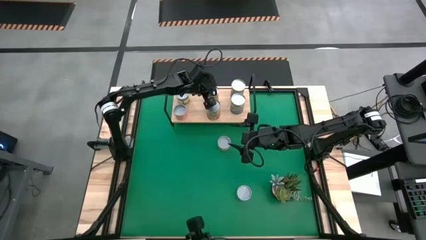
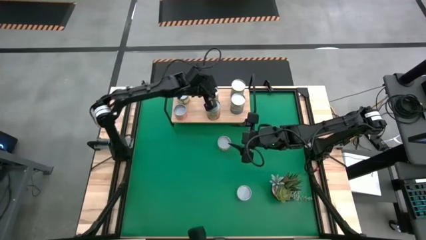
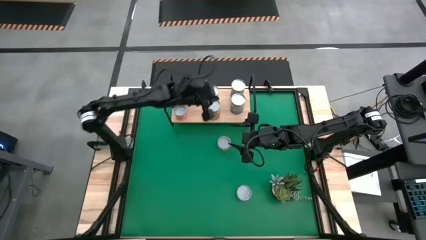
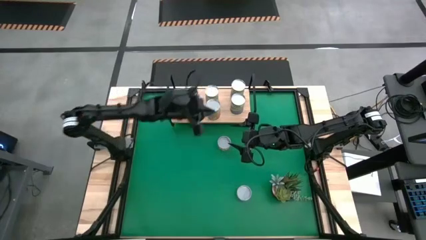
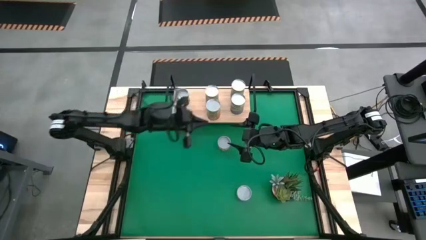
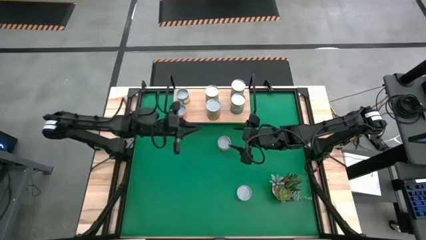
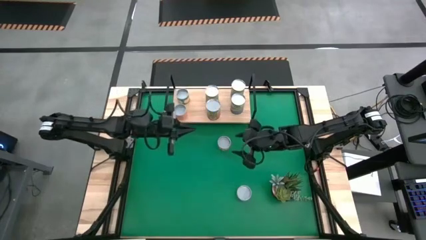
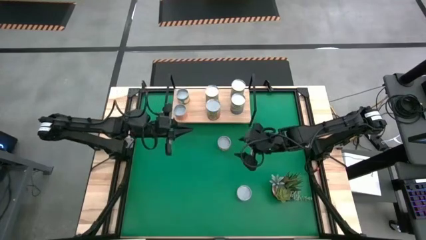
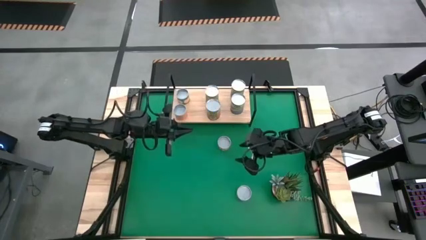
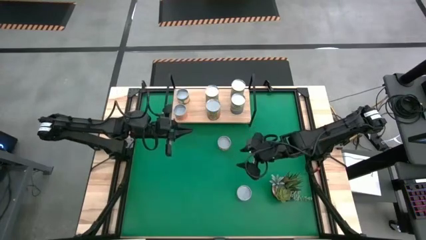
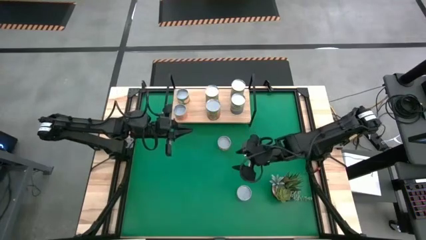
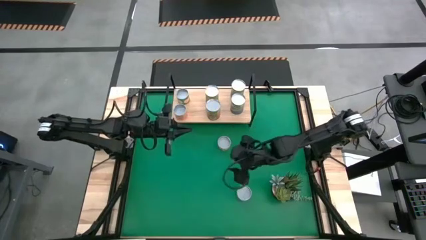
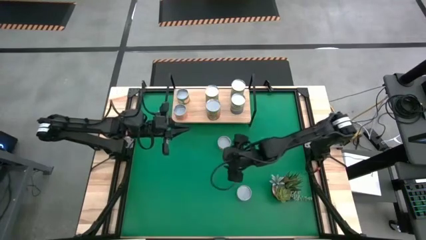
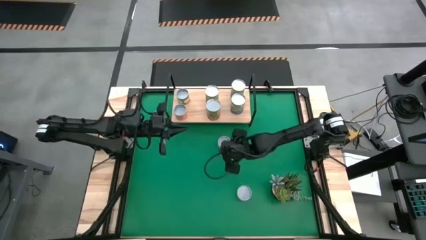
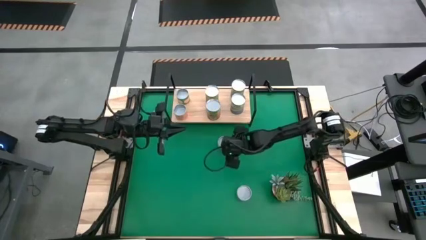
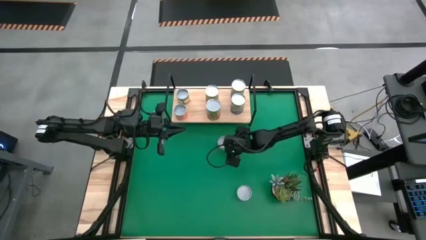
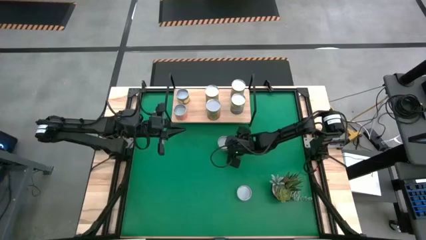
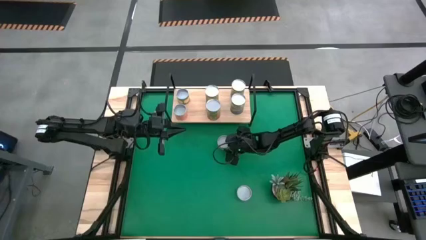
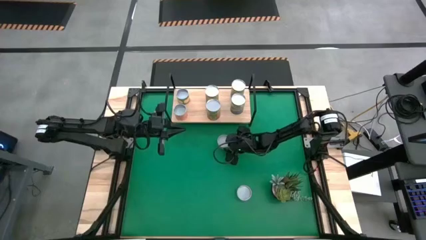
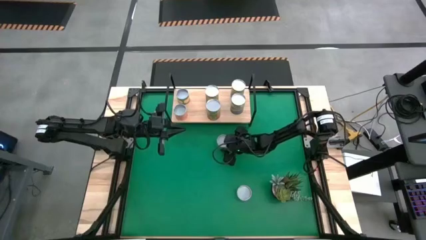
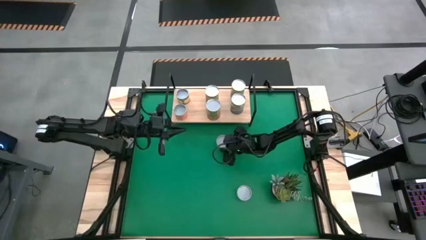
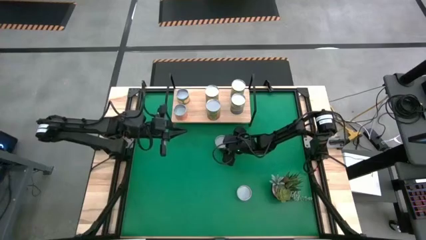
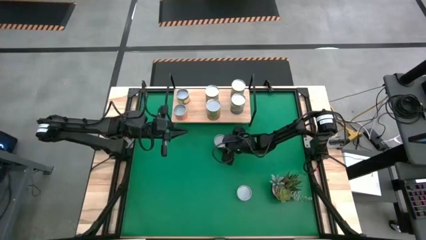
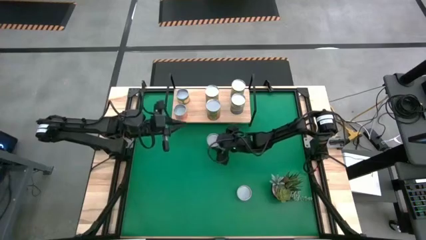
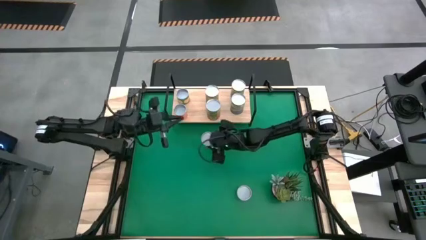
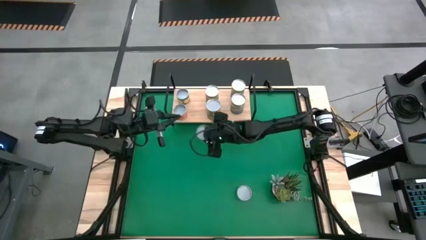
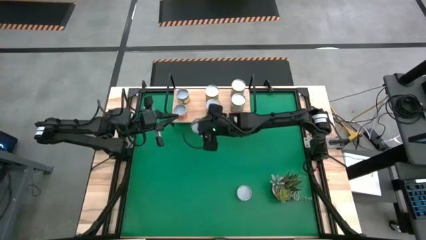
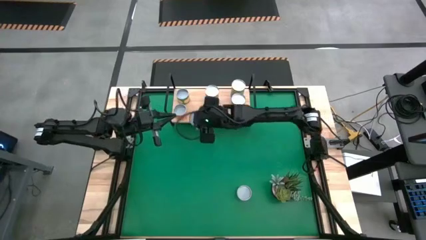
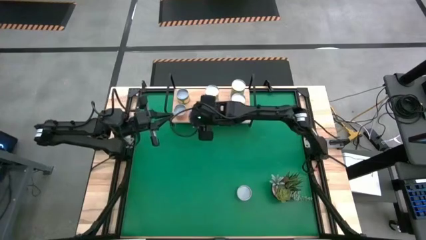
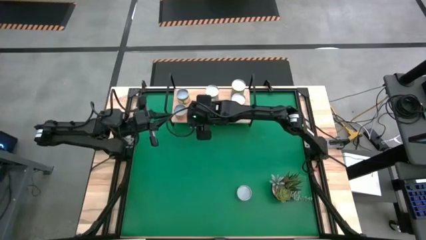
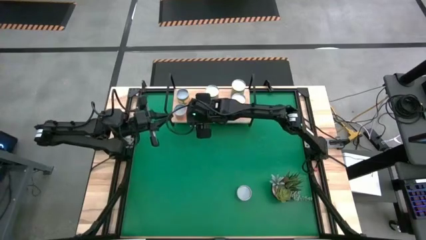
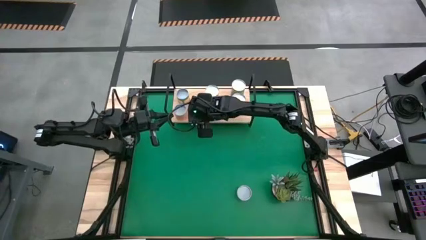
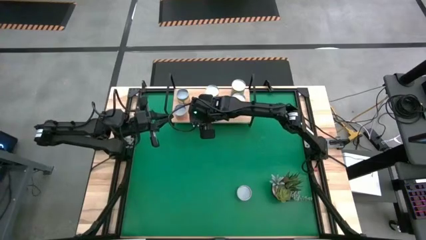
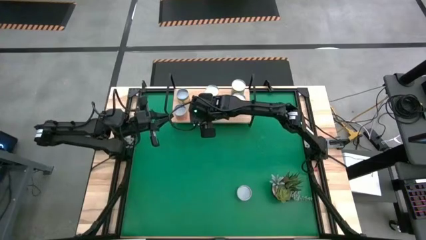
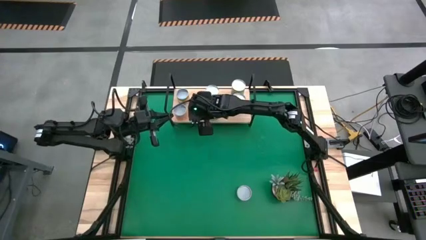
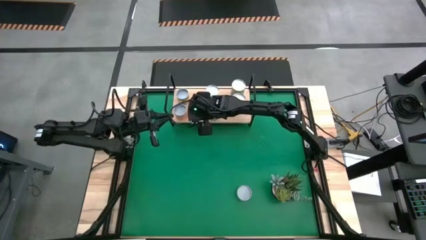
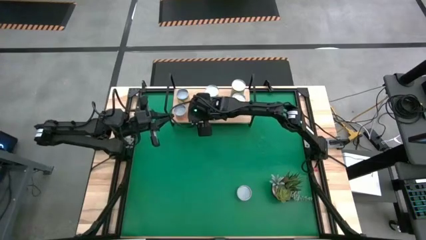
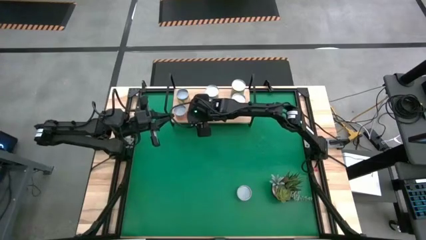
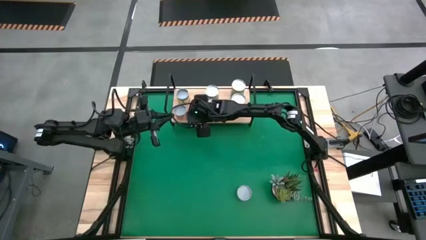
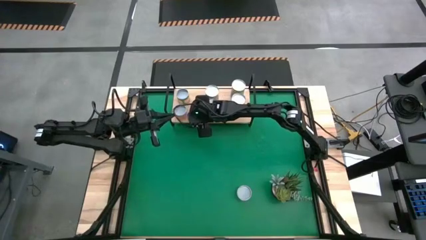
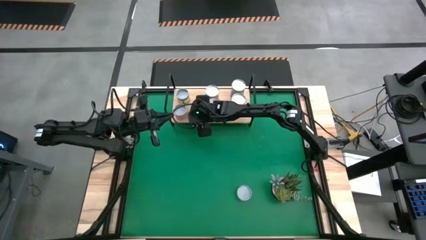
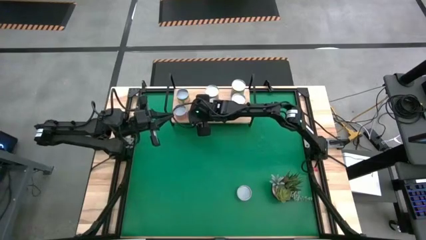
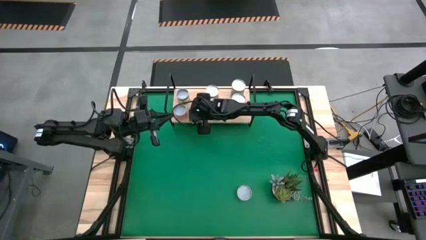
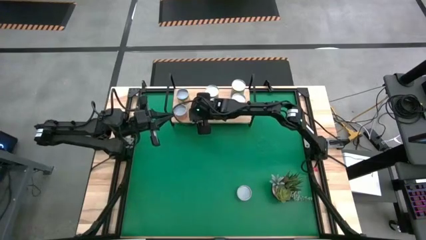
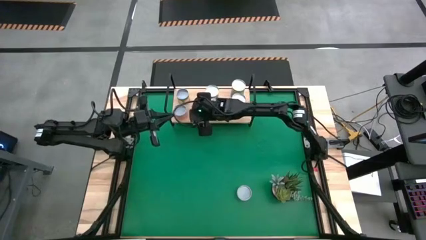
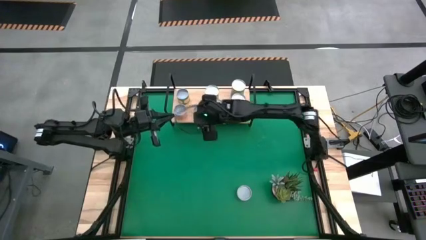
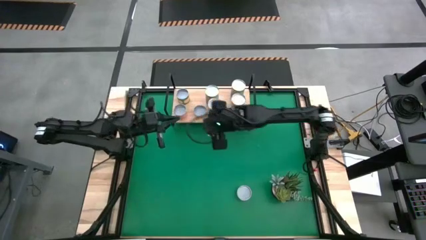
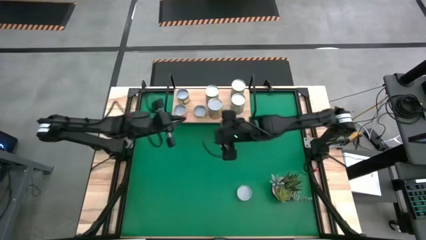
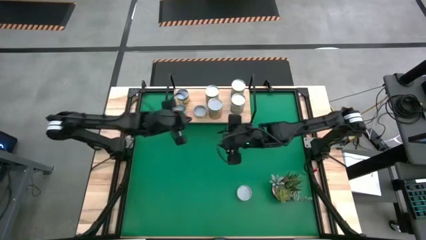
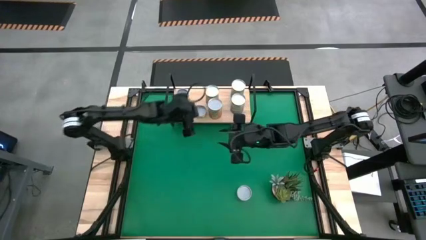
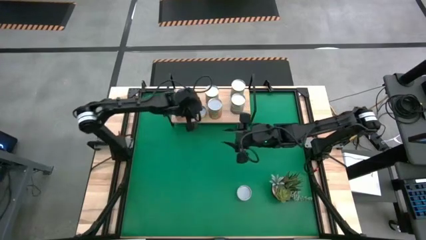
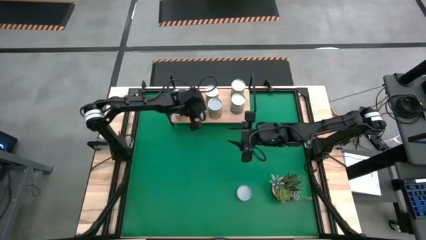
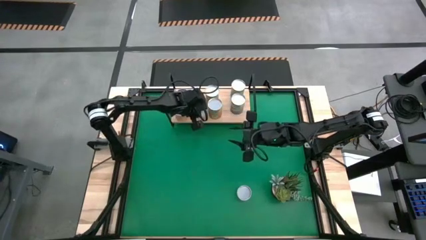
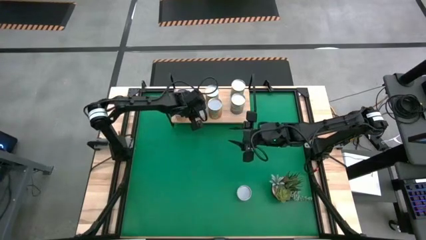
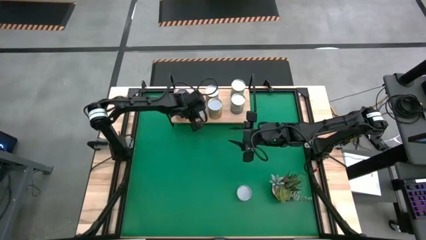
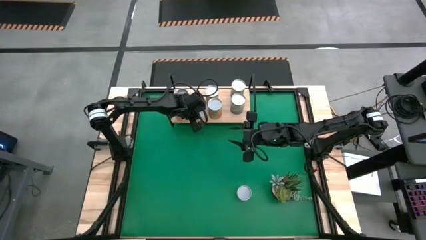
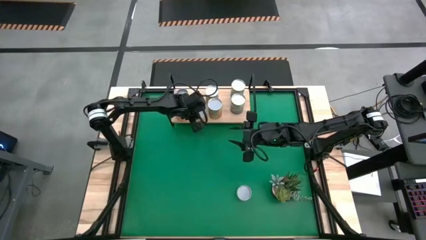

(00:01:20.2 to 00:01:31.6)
Task: Pick and place cans onto a shelf
Put the canned mushrooms on the shelf
